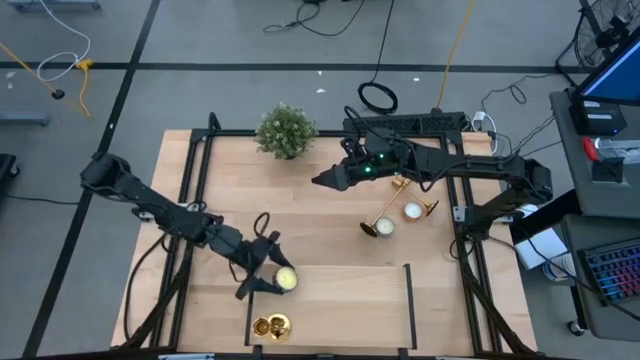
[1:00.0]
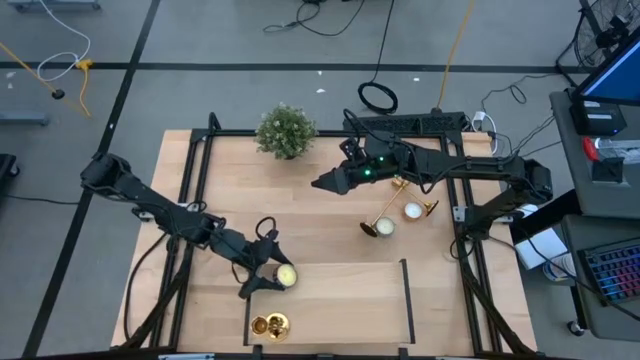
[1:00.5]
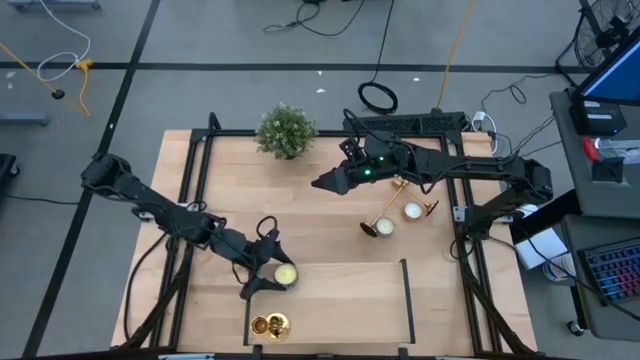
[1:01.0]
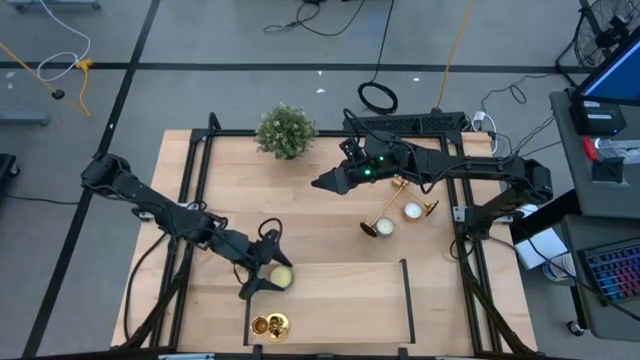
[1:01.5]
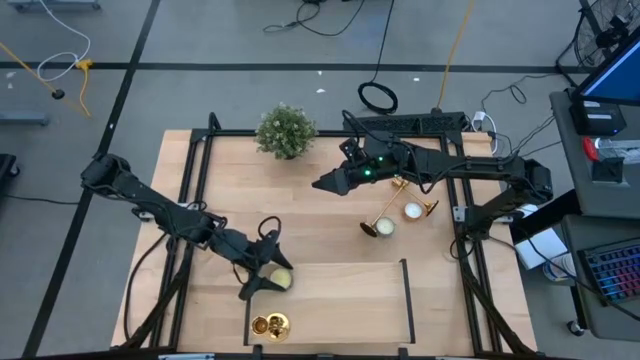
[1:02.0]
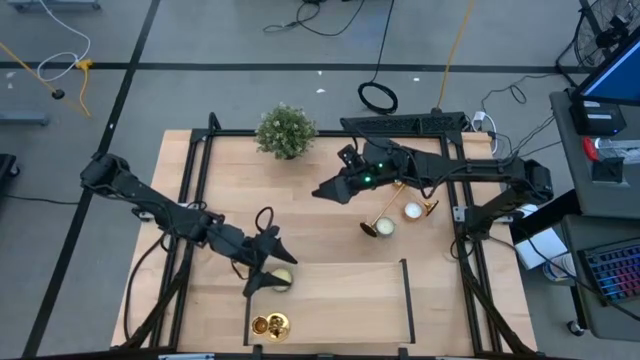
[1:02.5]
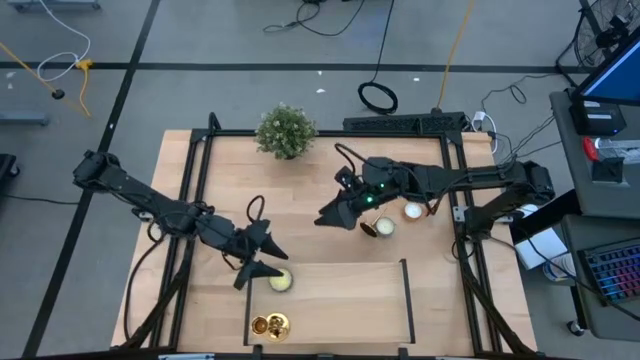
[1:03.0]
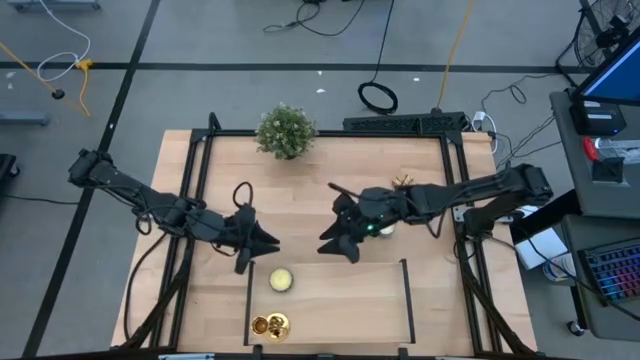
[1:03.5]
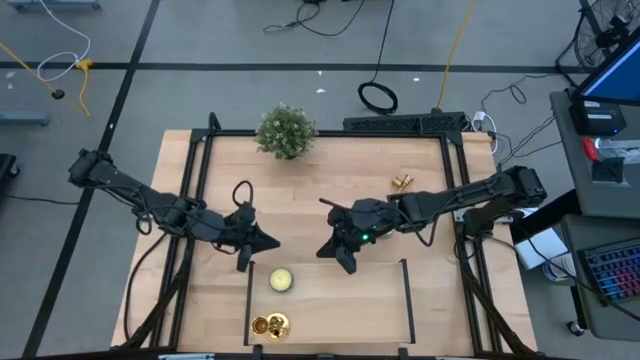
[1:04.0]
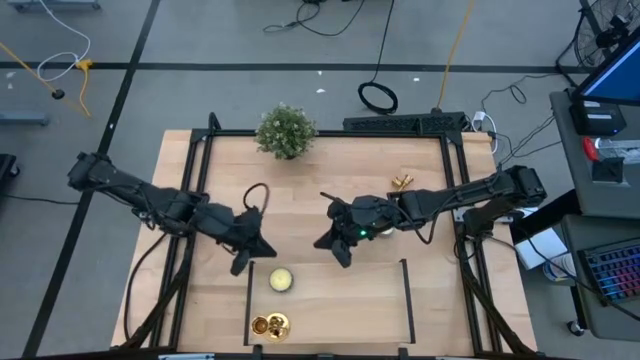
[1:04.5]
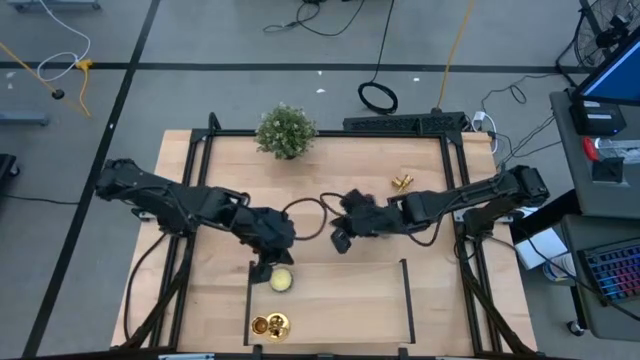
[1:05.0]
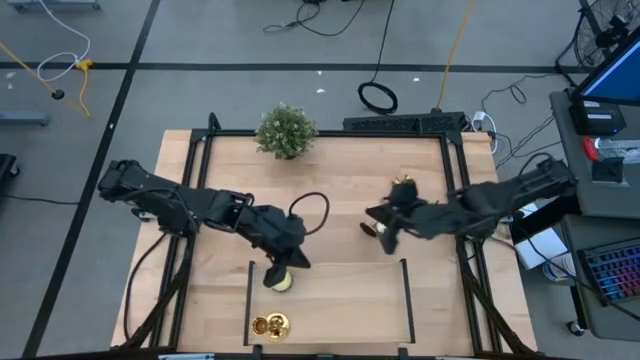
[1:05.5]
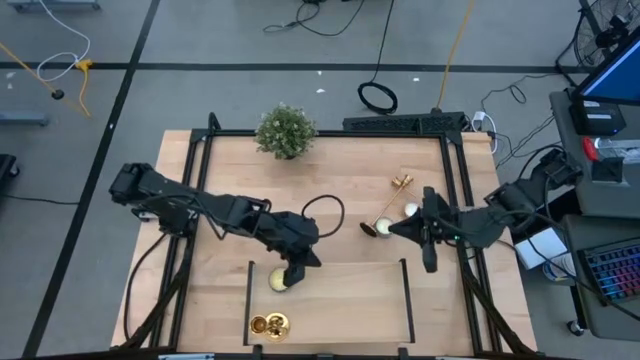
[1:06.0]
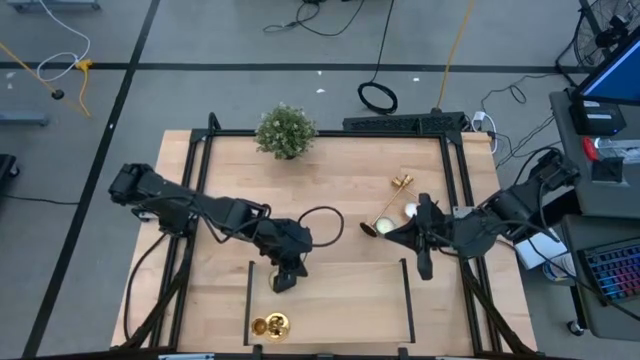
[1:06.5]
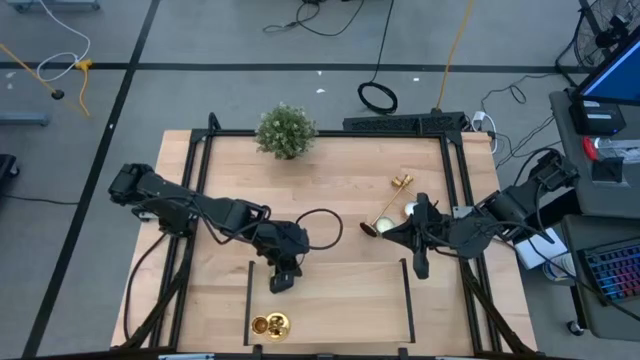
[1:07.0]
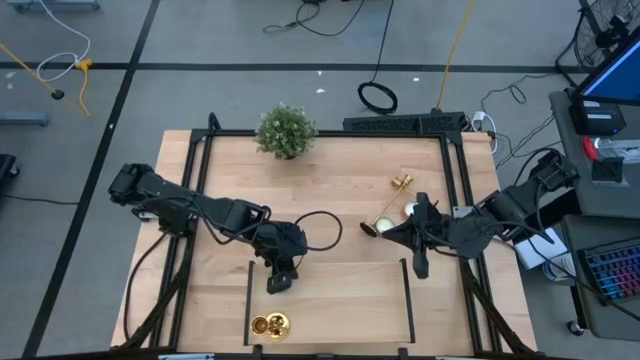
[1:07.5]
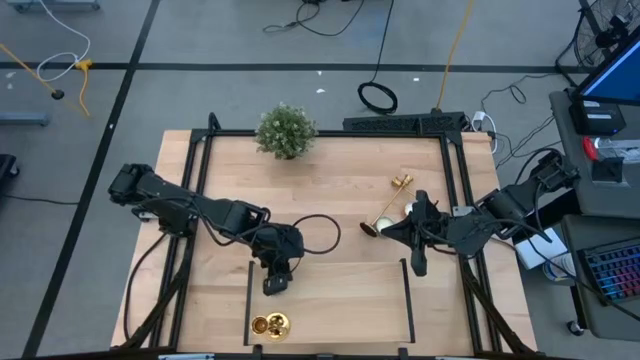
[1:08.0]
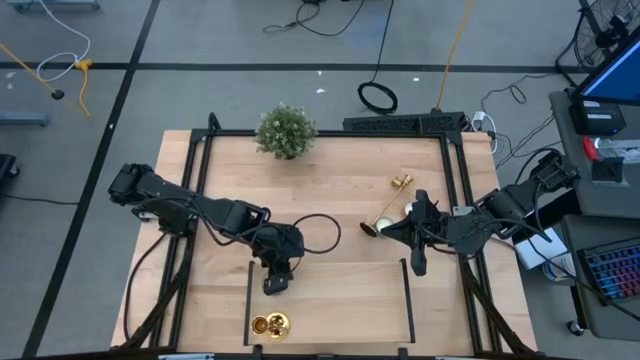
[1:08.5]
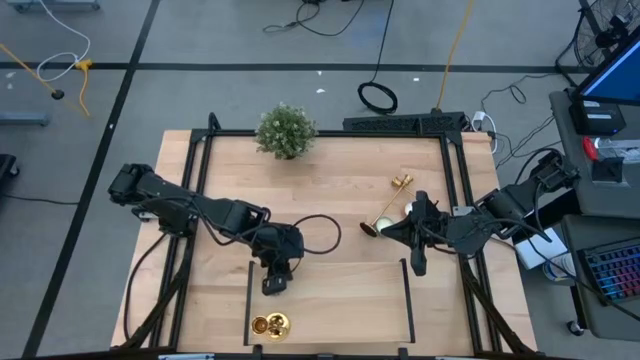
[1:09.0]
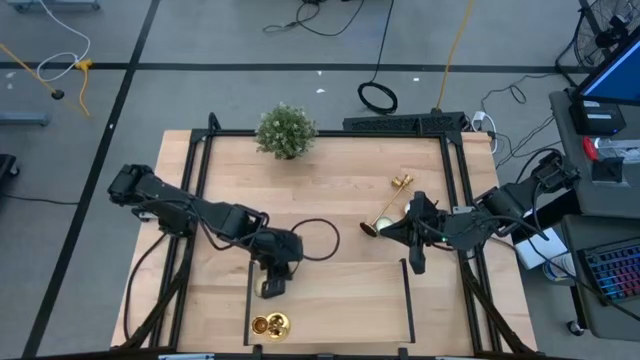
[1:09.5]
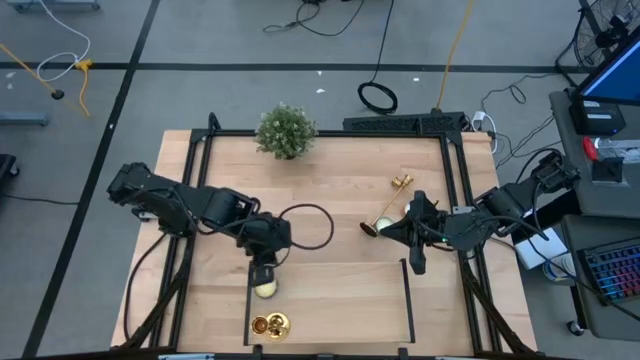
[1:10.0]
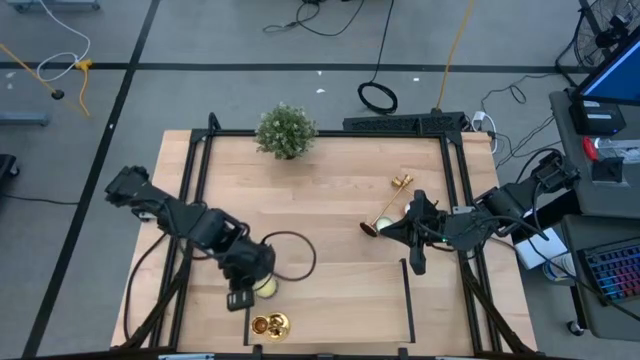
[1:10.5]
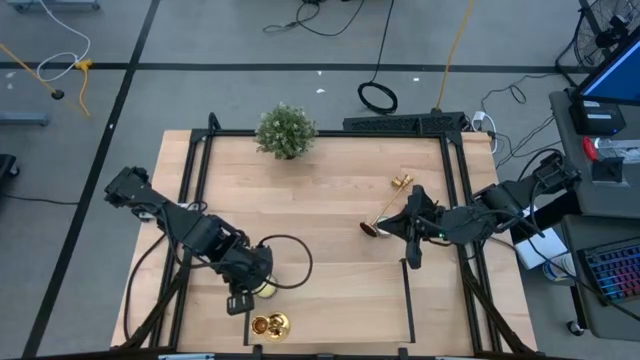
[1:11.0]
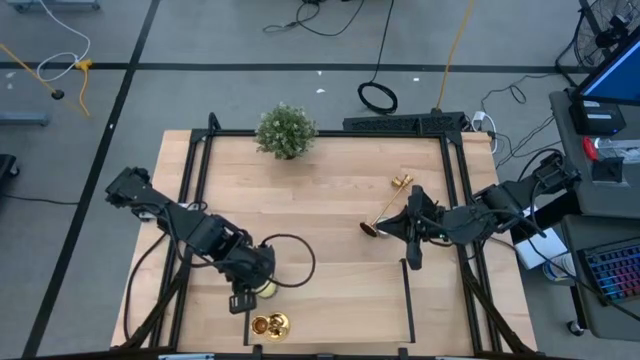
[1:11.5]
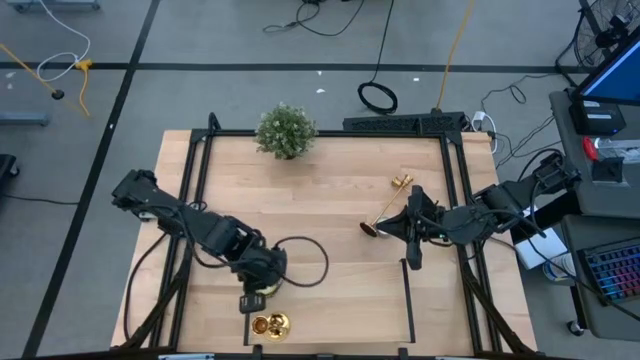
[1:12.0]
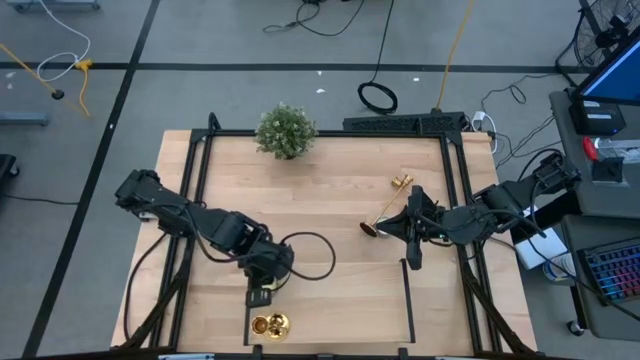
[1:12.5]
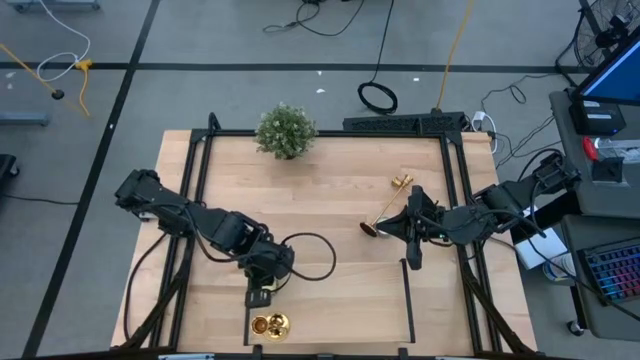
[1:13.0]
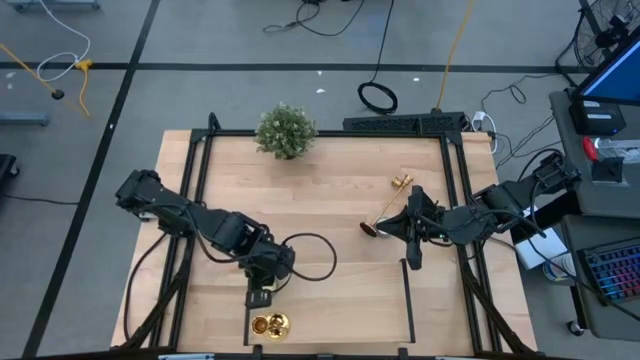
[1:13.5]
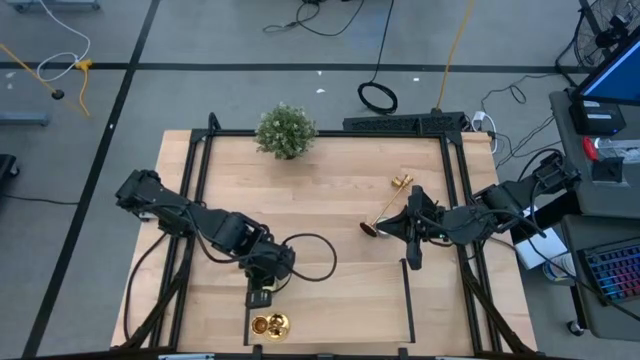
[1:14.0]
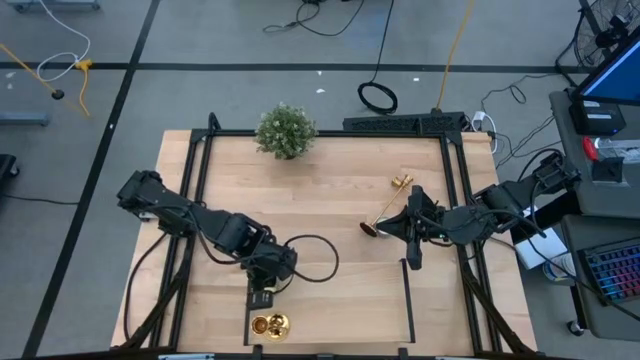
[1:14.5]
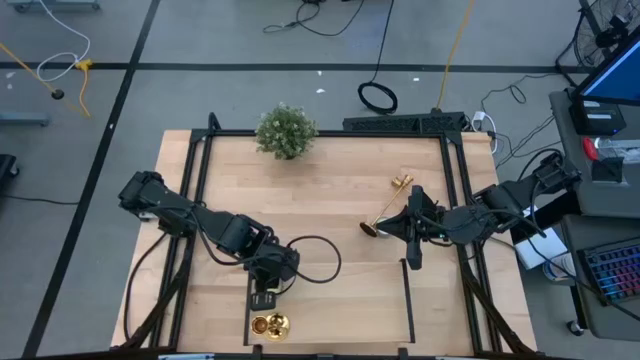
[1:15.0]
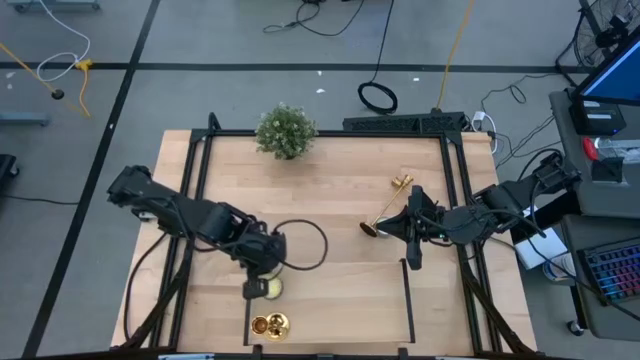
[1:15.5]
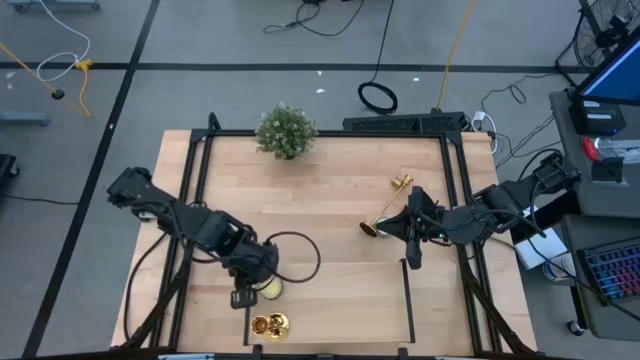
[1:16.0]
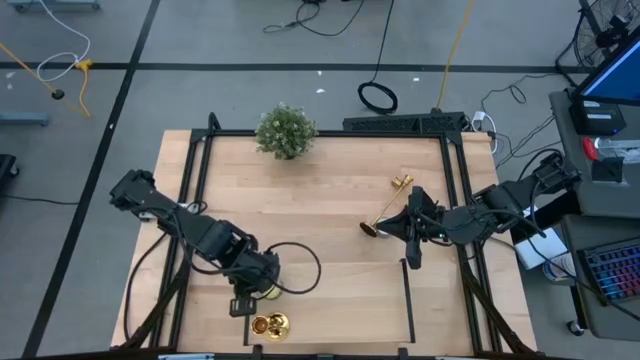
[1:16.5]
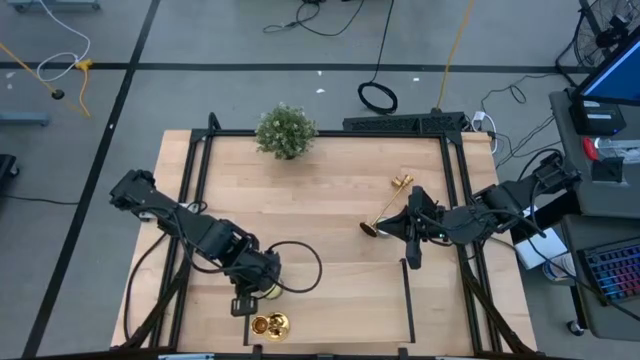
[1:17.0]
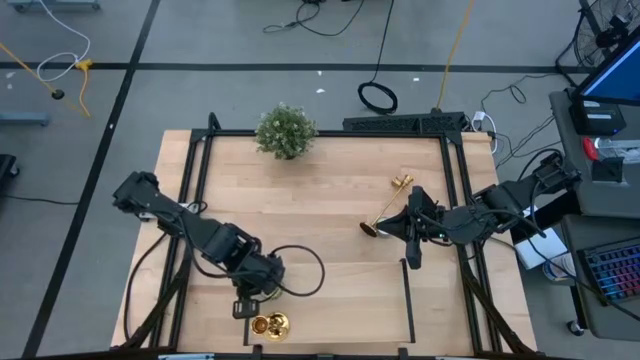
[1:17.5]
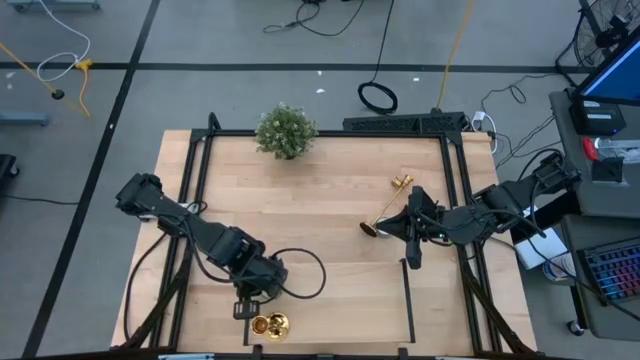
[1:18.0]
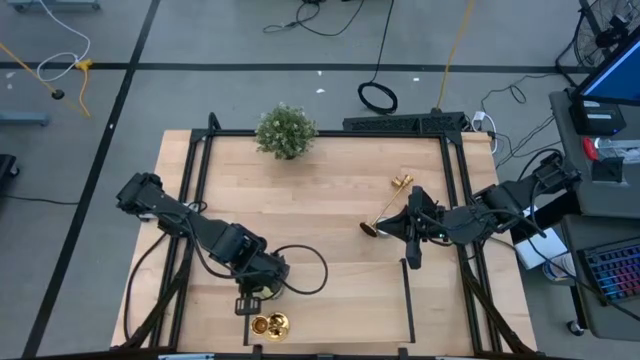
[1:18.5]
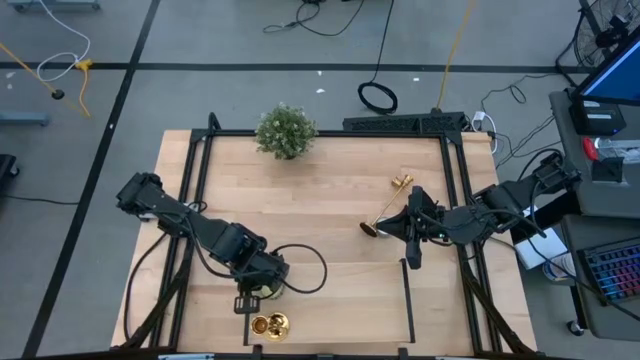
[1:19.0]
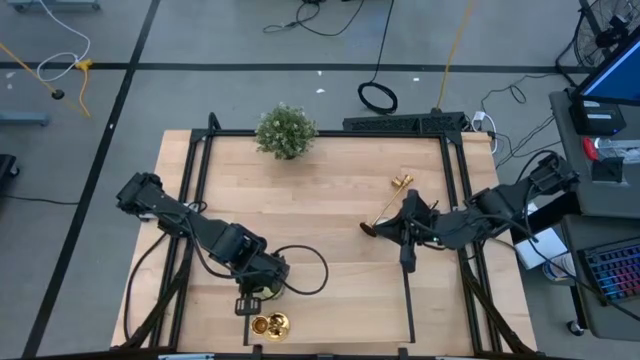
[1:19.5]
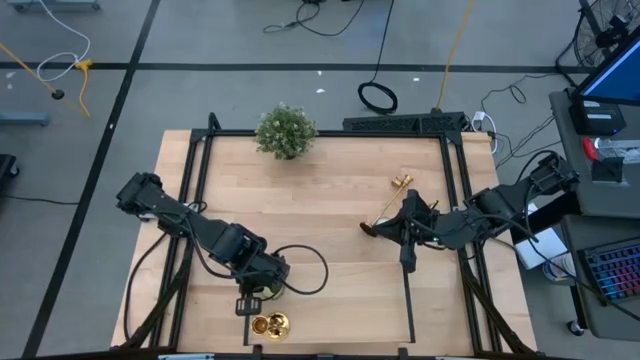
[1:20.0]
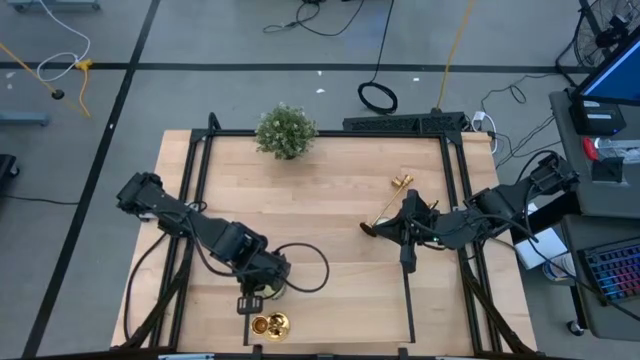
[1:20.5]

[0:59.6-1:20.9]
Task: Pick & Place candle stick holders
Put the black patterned scented candle on the shelf
